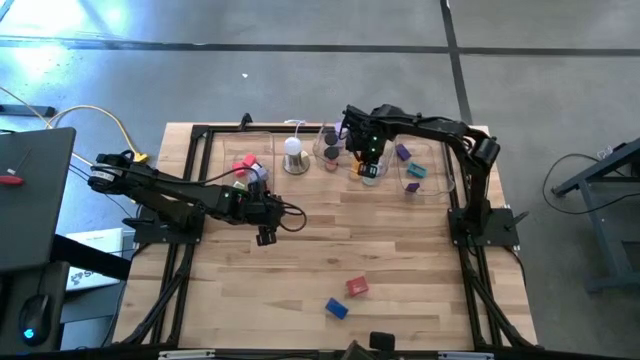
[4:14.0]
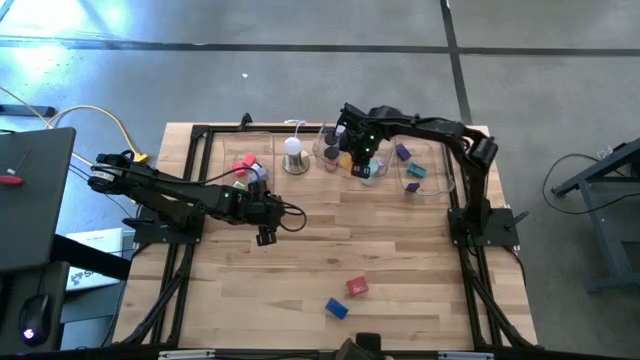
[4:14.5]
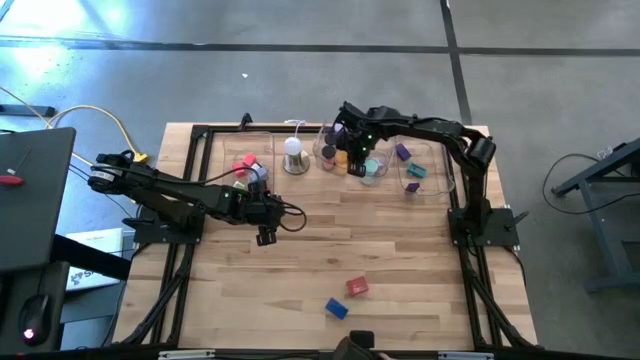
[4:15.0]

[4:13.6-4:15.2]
Task: Pick & Place Office items
Adjust the yellow hourglass on the middle transparent bin

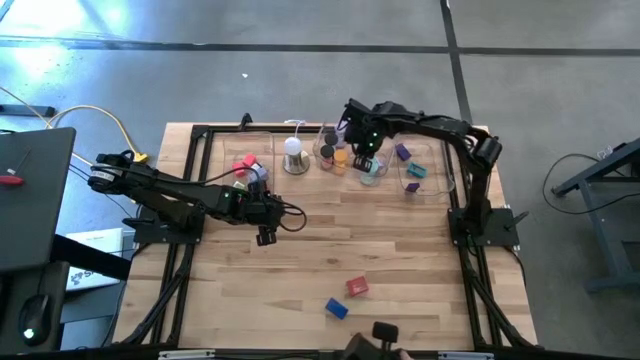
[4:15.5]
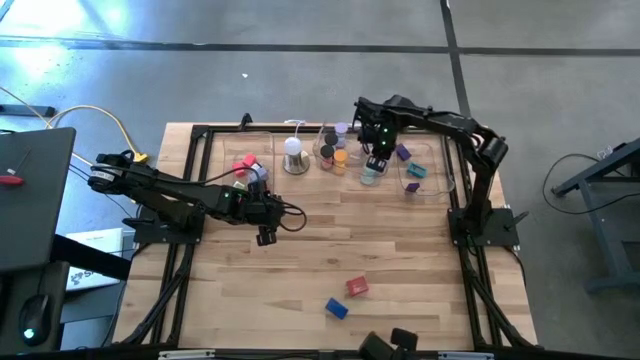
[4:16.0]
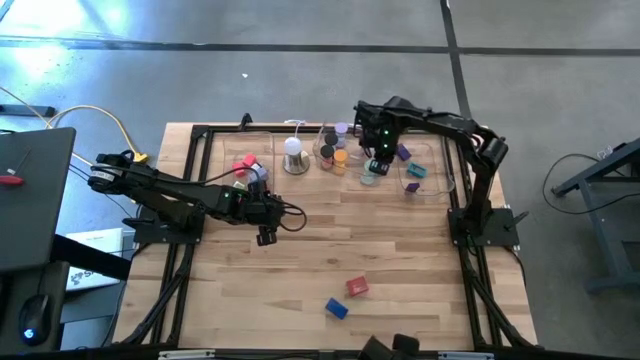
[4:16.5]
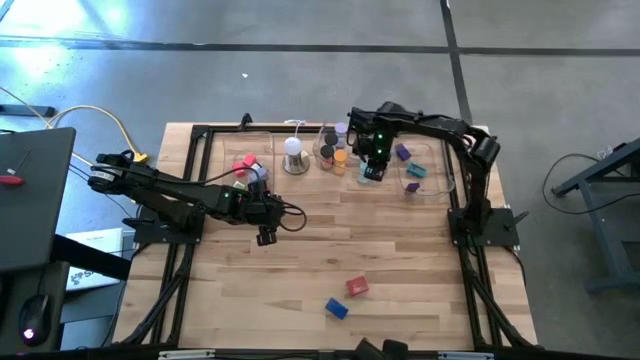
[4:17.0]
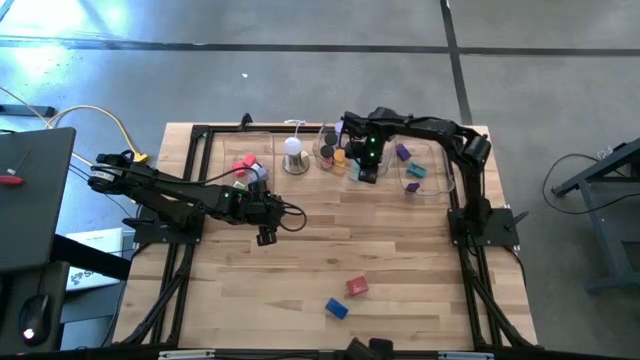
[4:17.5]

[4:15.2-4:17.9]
Adjust the light blue hourglass on the middle transparent bin

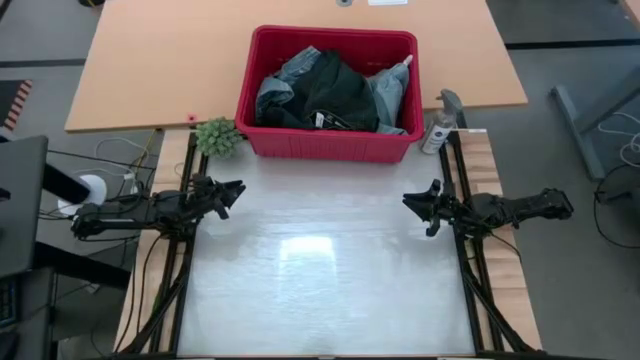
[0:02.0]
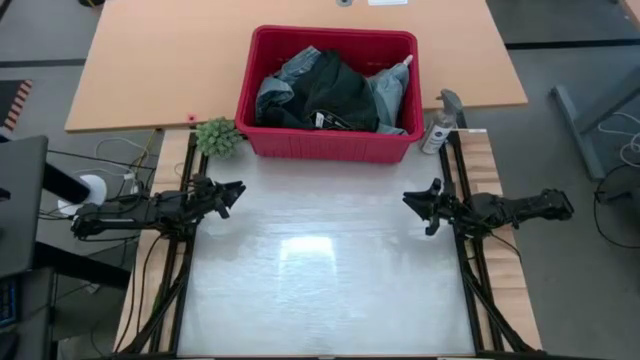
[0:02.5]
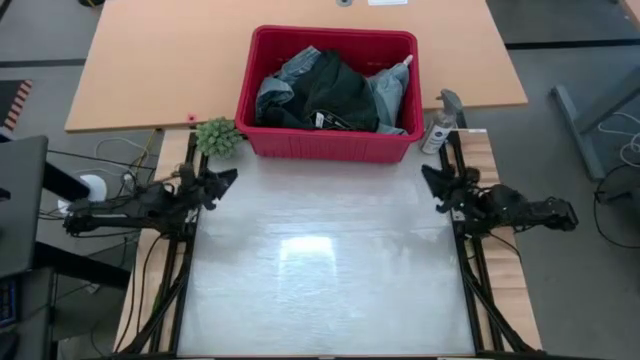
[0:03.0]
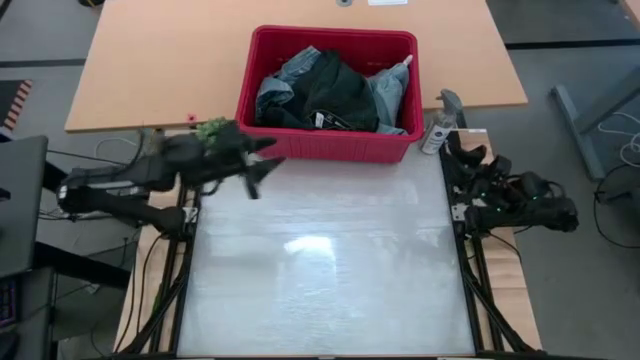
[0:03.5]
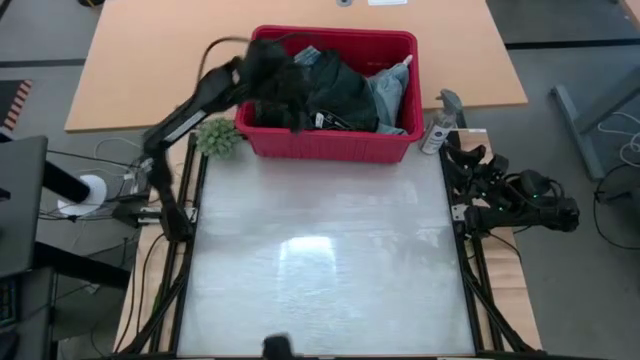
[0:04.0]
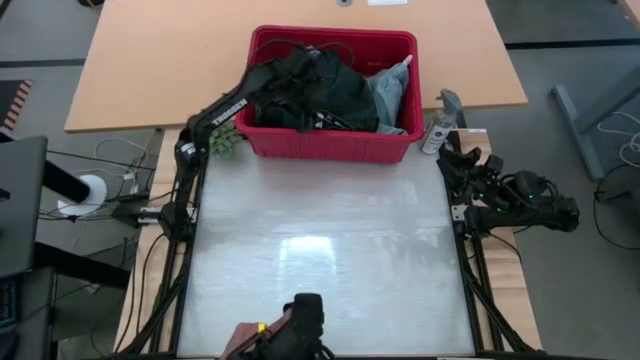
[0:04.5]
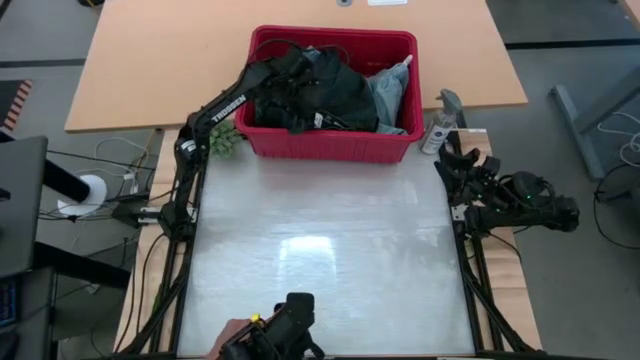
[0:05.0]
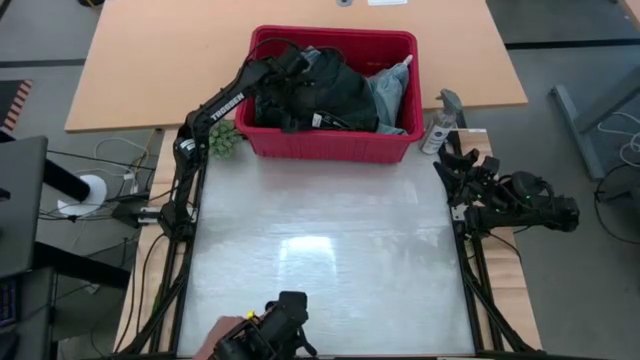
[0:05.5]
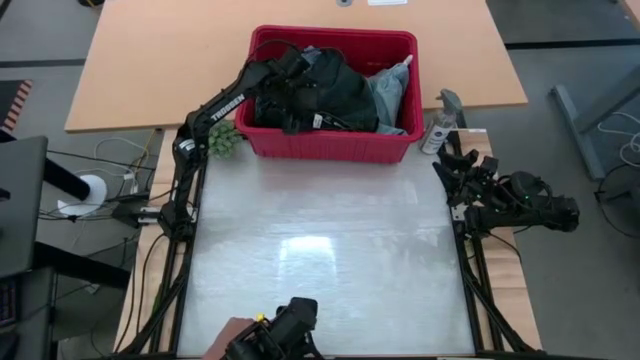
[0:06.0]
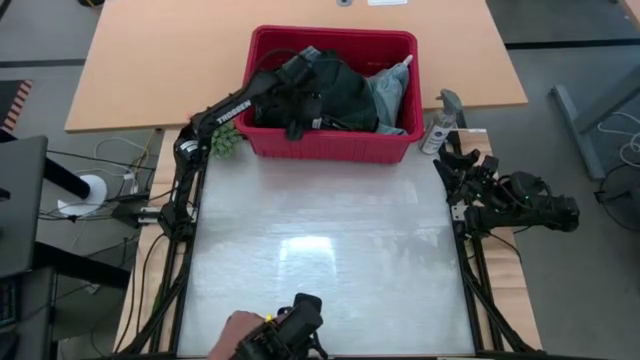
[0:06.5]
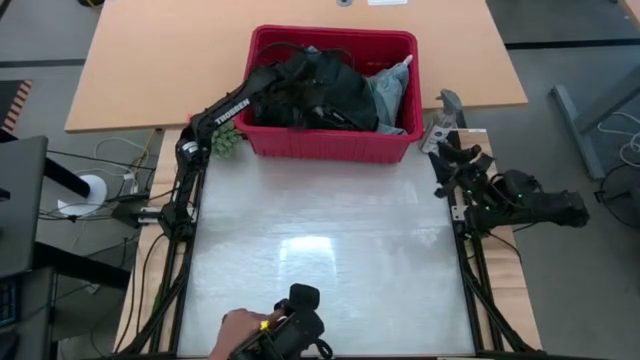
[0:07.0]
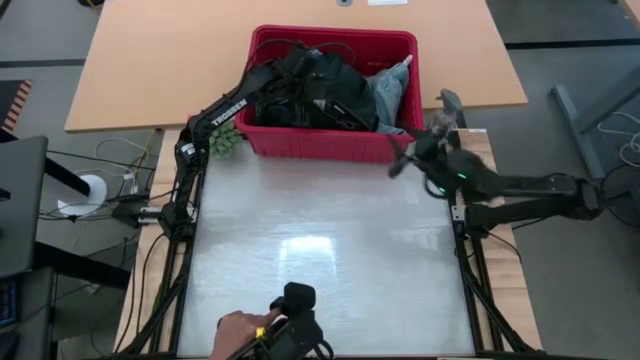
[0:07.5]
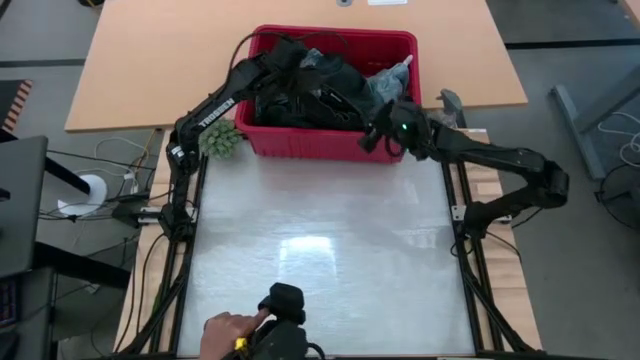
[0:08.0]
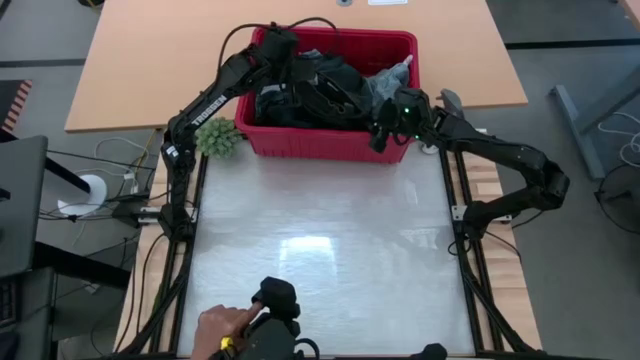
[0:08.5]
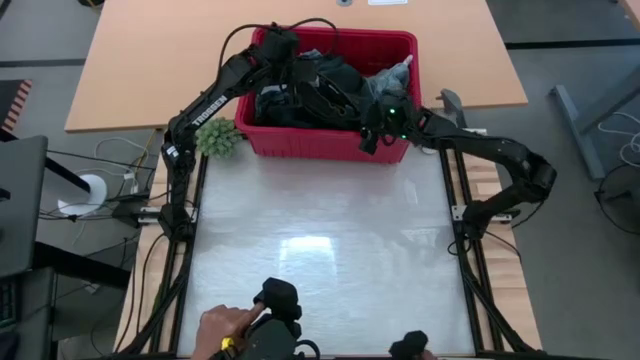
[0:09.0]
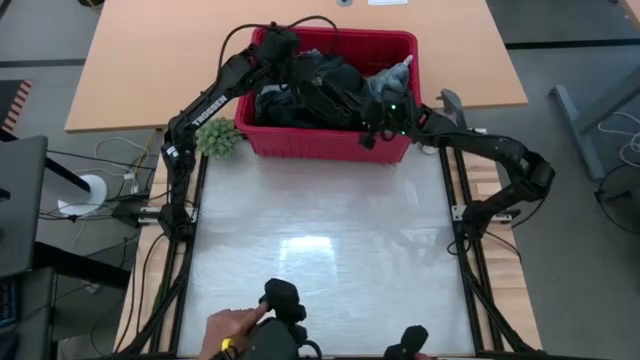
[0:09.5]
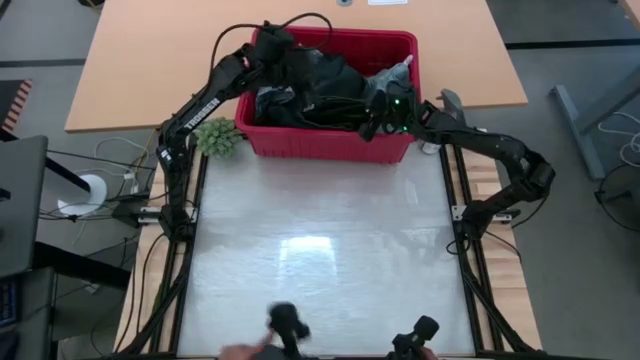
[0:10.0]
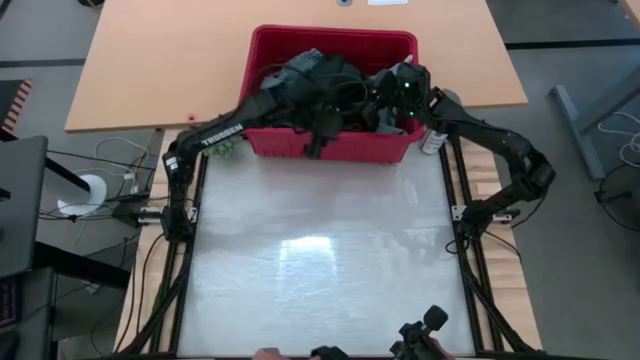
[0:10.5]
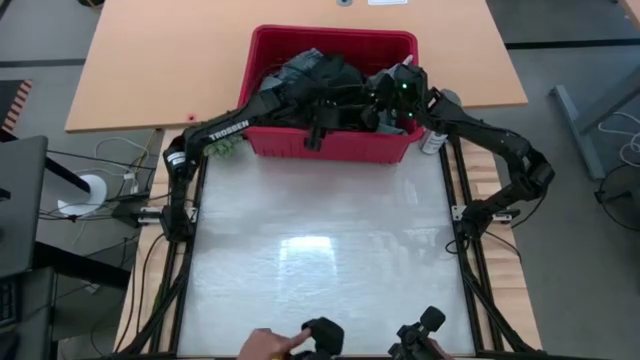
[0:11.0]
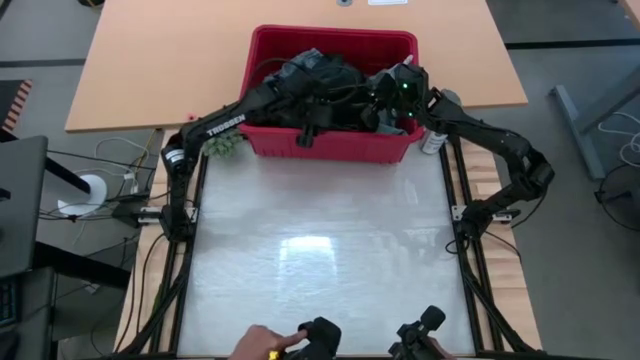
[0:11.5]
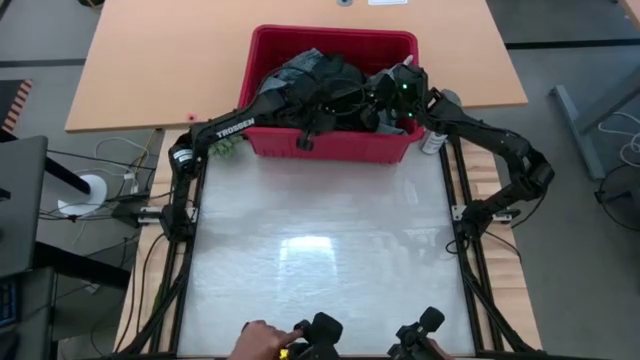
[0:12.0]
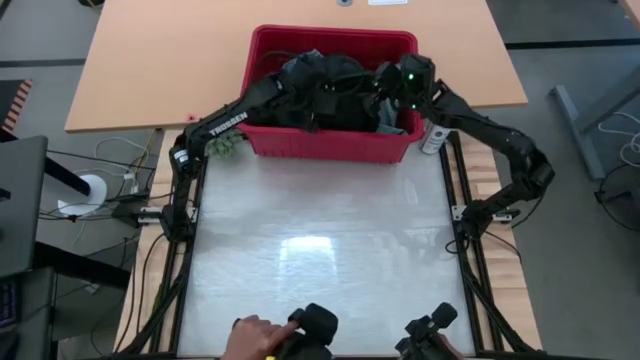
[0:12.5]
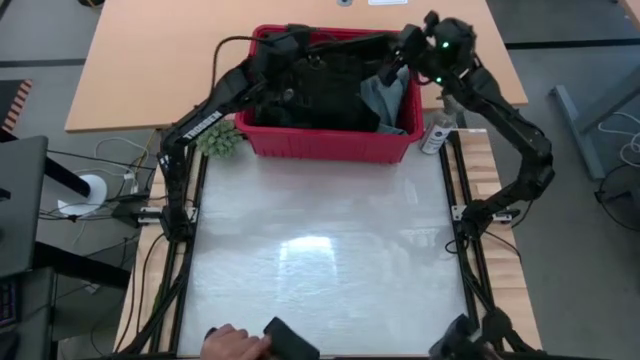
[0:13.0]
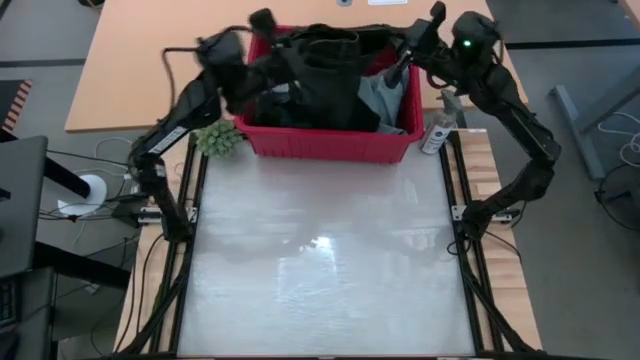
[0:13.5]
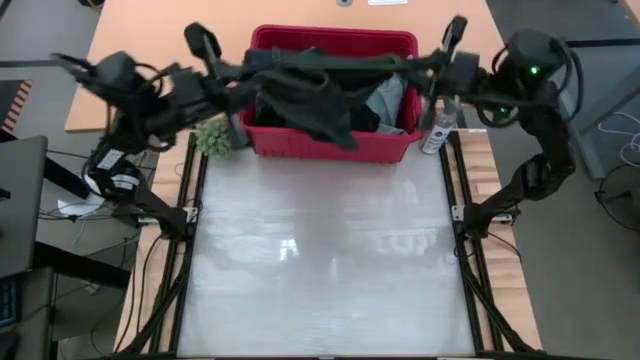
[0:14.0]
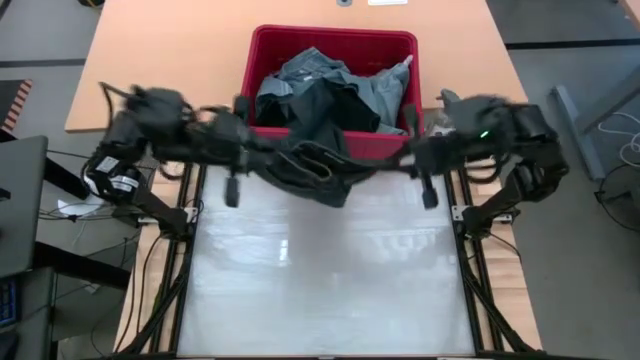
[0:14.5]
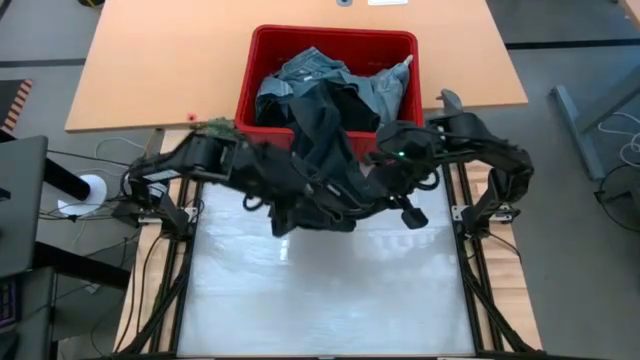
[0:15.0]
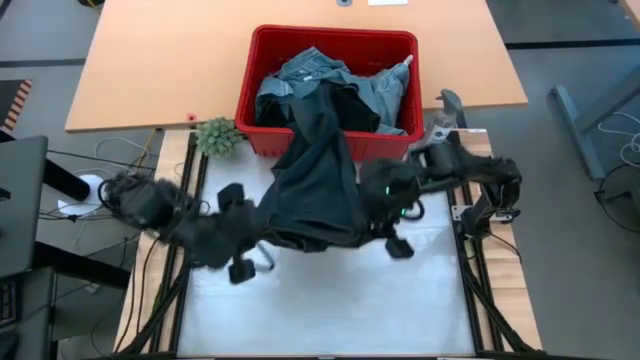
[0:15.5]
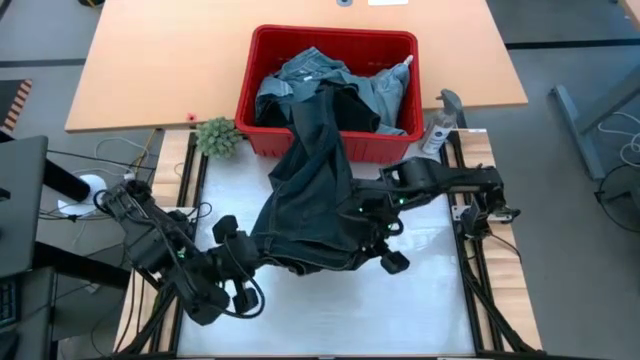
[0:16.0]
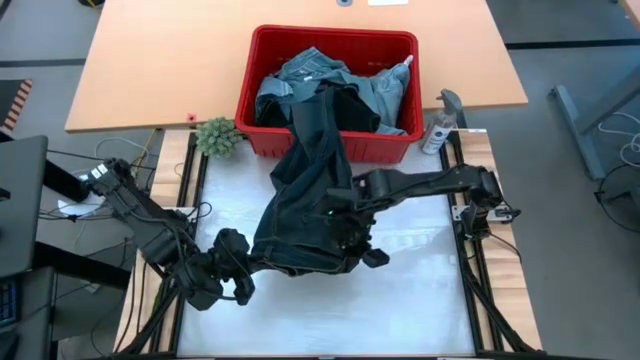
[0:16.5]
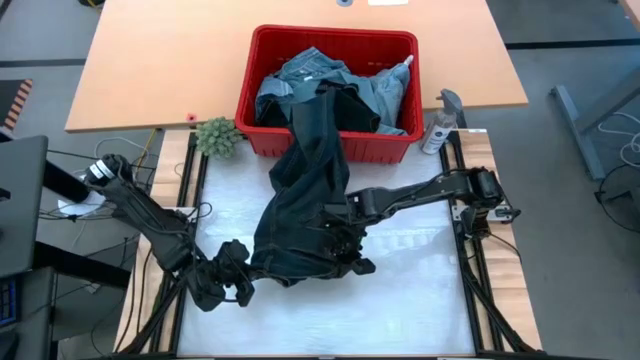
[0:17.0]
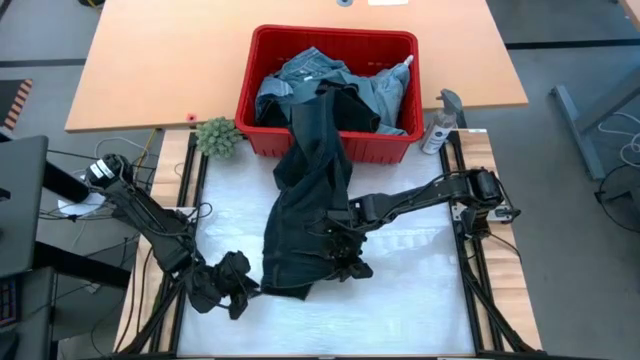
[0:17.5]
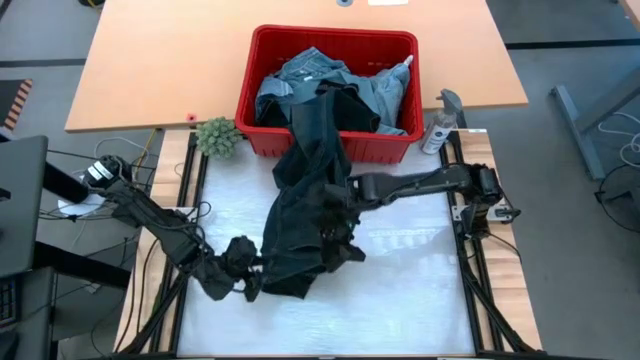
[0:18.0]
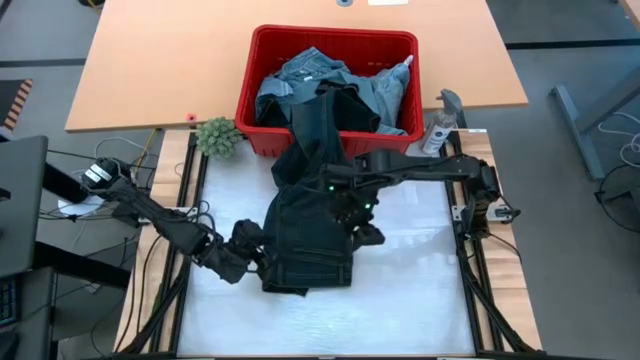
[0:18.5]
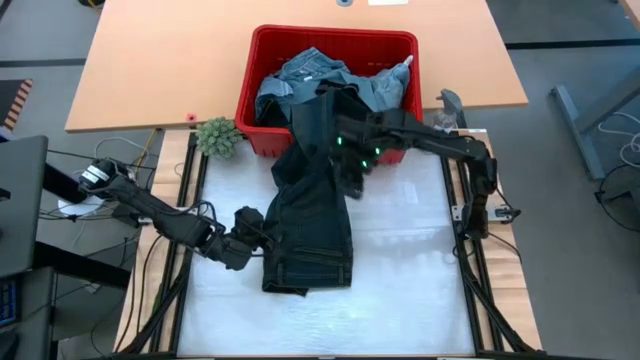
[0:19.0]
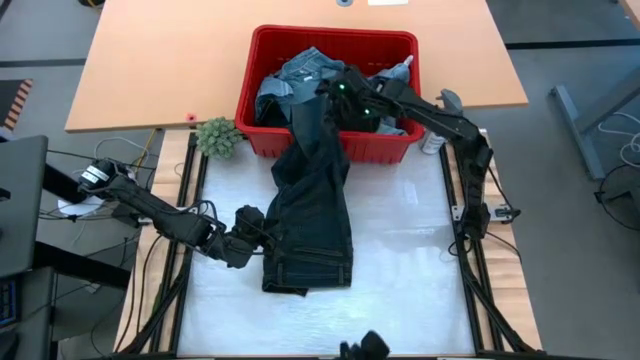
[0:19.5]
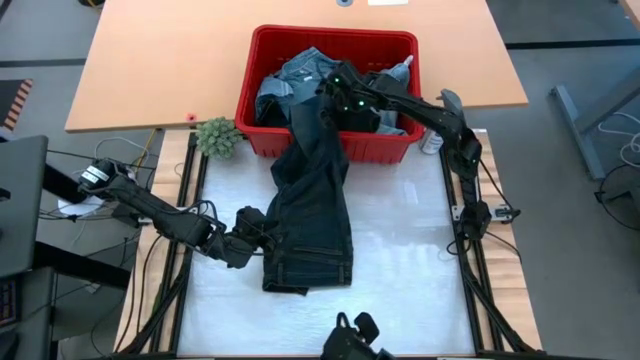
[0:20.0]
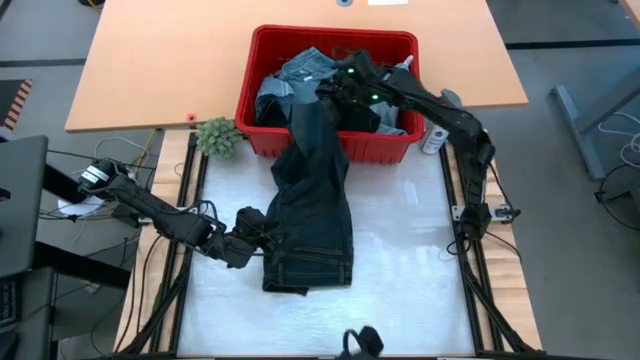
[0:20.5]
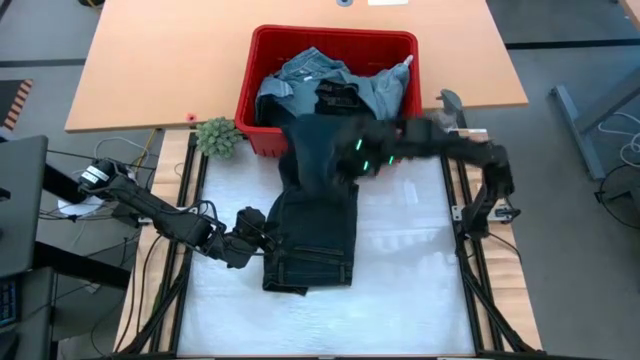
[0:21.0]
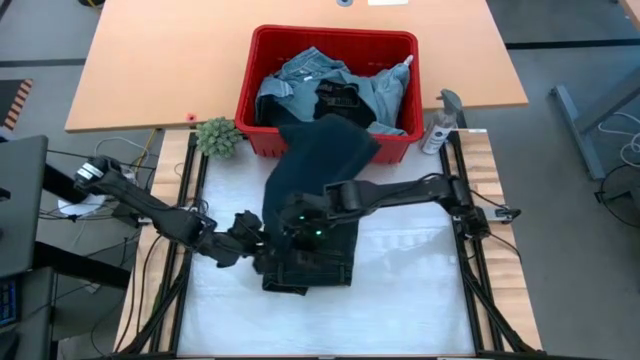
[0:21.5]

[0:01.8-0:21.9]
Task: Fold Laundry from Bin
Fold the black pants
